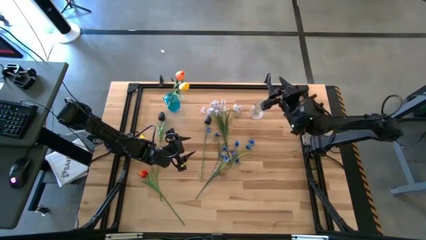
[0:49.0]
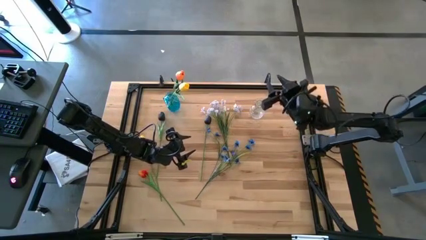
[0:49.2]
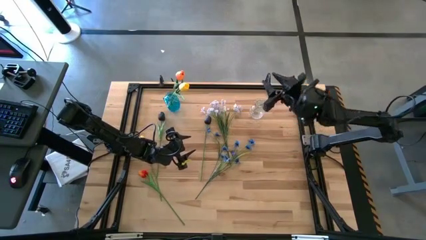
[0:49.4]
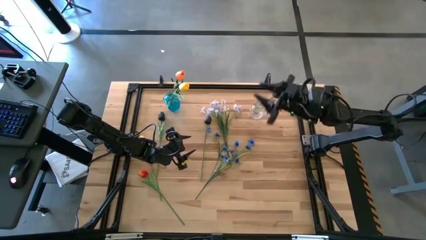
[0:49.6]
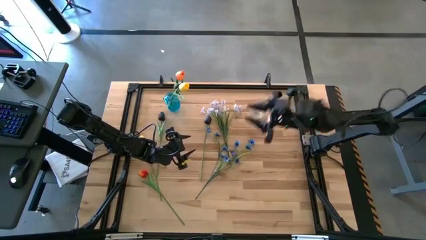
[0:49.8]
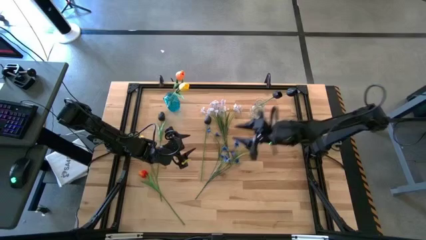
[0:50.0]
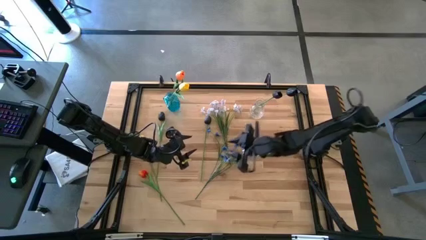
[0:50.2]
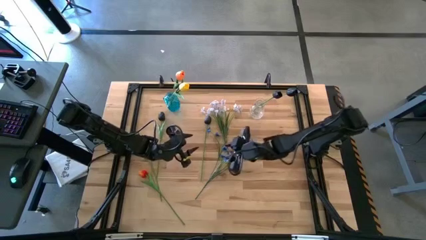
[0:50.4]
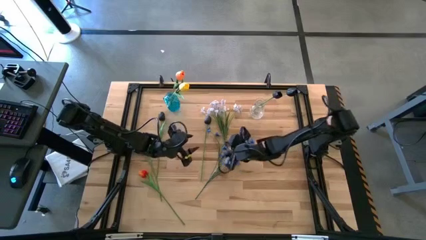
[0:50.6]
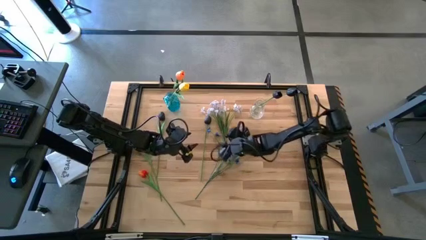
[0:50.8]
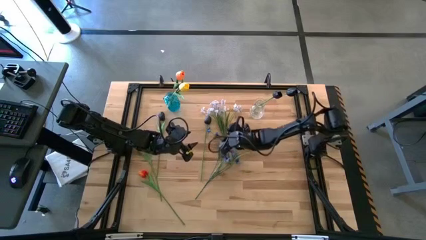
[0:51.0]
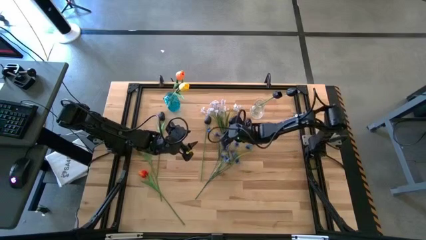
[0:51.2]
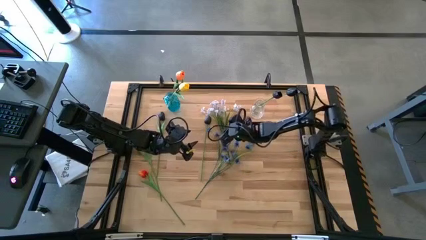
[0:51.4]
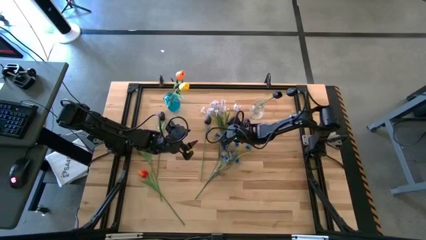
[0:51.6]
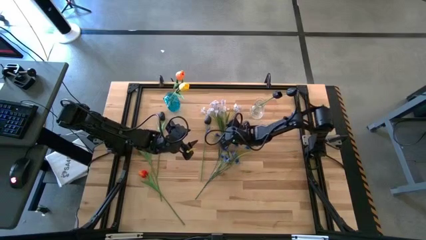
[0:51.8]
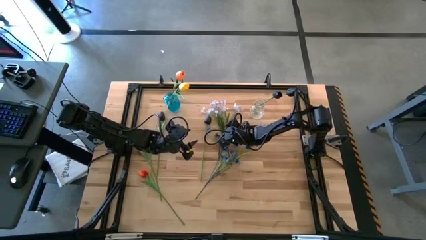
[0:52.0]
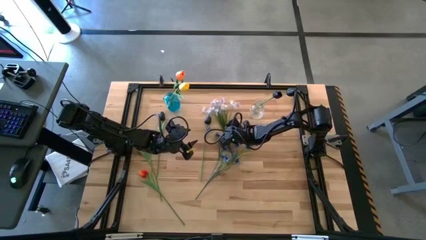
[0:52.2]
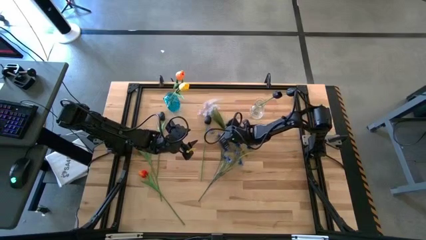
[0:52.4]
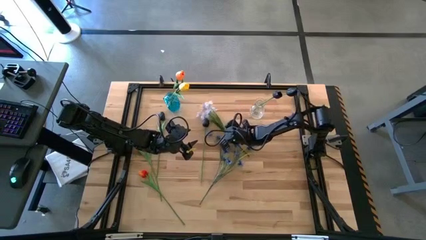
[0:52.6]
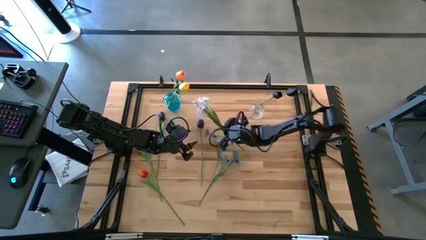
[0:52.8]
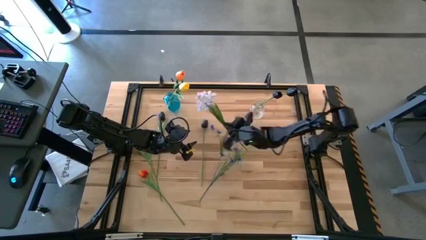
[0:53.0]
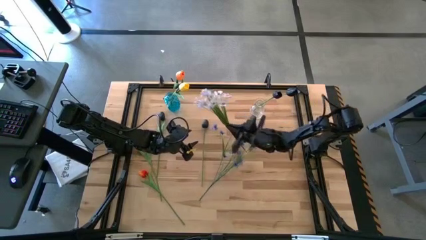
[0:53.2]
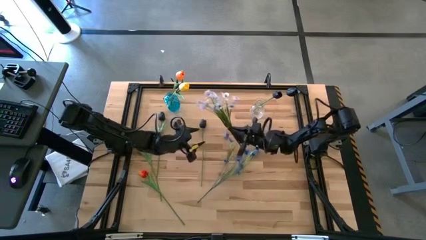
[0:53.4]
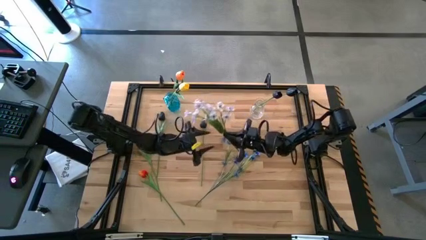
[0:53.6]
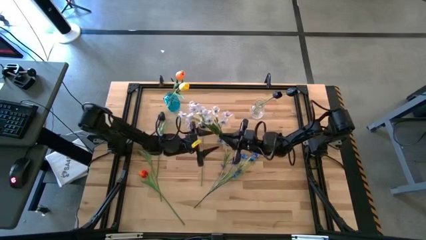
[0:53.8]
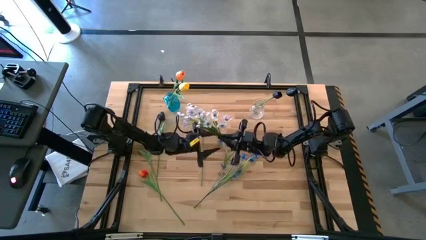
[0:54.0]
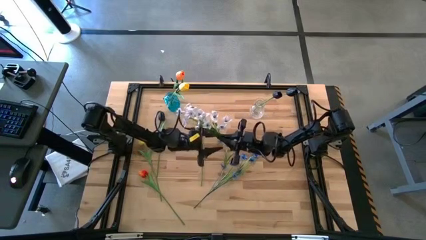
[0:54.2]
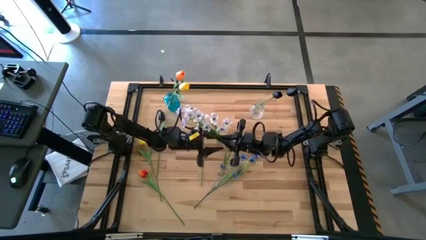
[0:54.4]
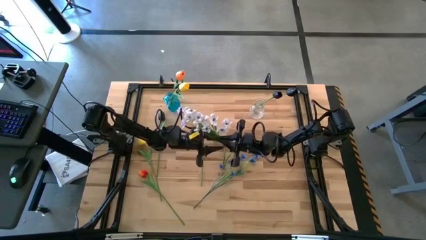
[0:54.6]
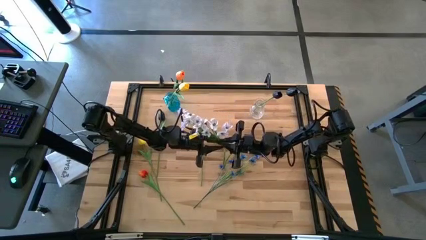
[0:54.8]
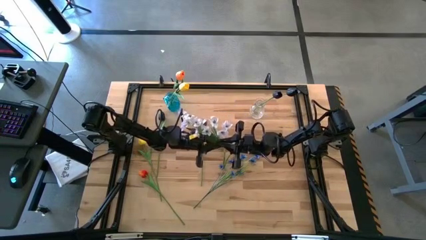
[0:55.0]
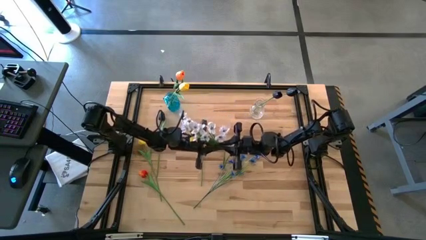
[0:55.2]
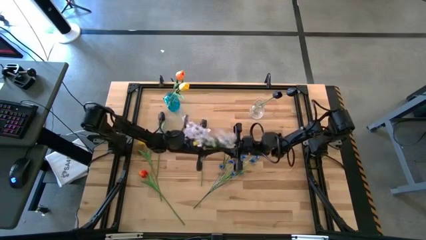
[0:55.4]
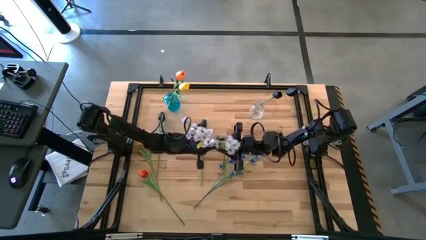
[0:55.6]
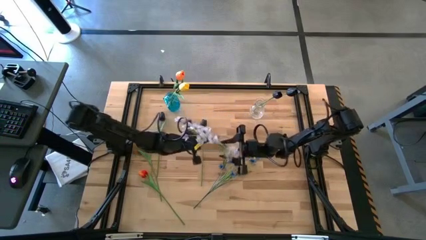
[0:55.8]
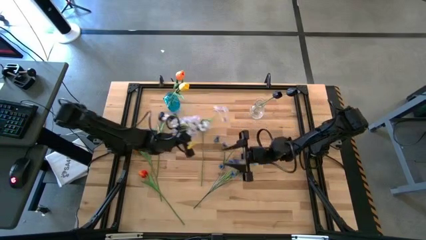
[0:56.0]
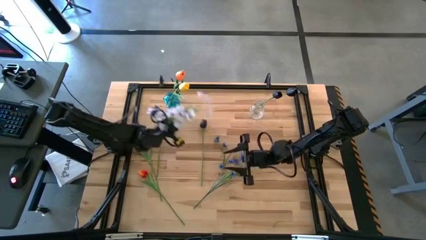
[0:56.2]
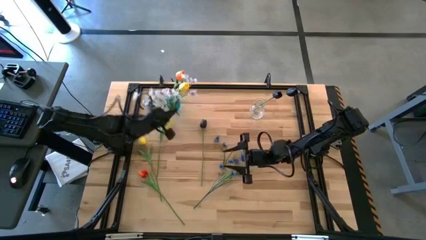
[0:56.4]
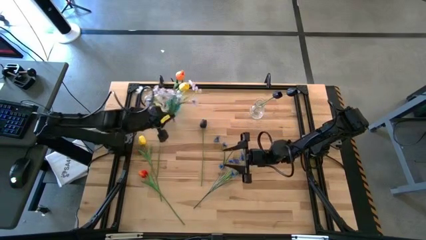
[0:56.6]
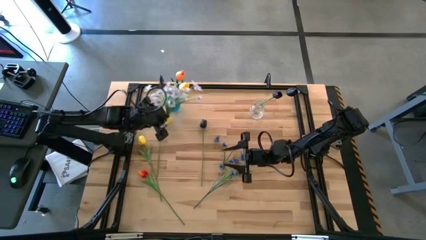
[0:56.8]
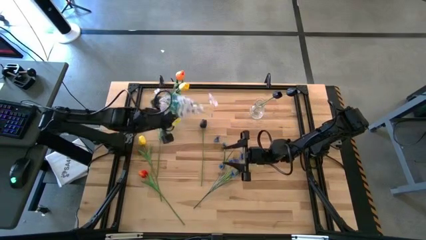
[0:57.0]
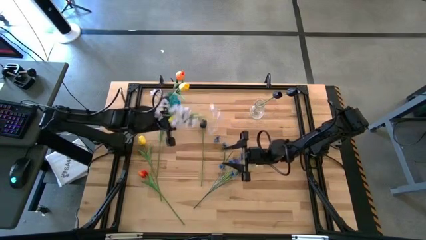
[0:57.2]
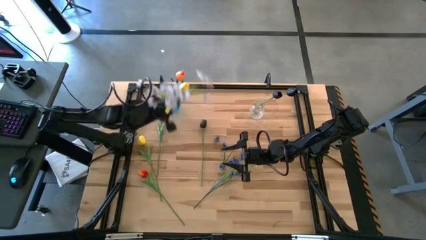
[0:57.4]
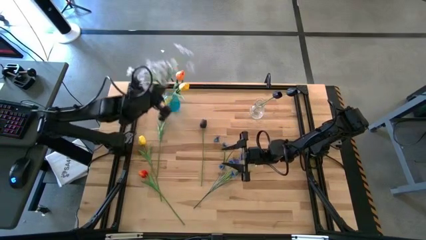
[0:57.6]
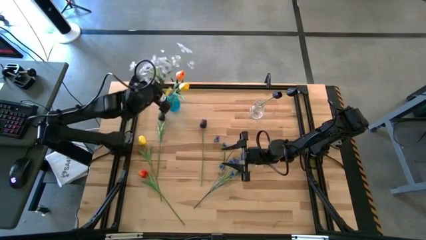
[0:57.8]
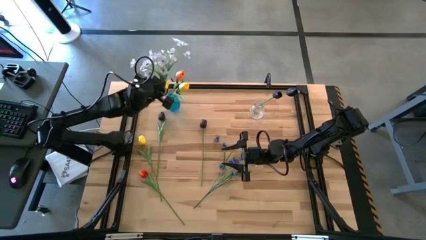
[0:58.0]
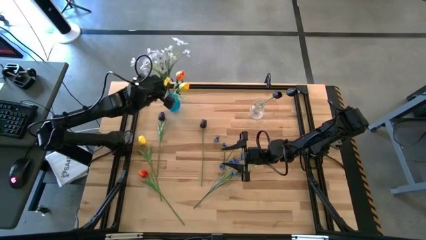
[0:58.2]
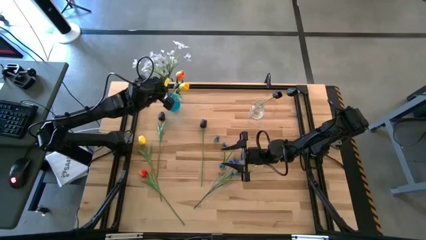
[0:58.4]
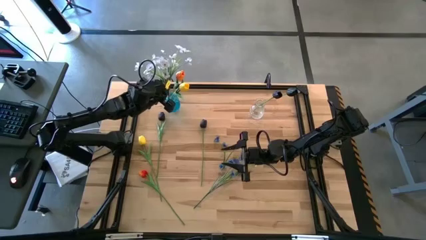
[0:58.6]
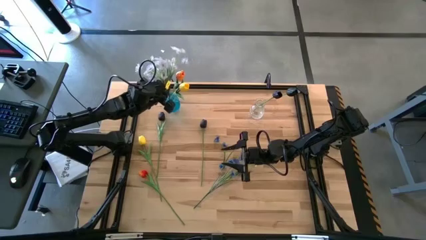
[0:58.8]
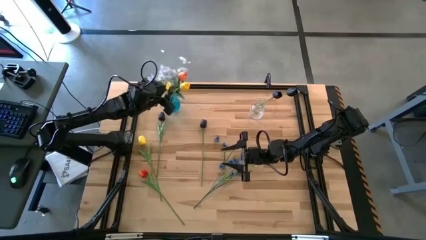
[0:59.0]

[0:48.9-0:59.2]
Task: Sort flowers into vase by color
Put the white flowers into the blue vase

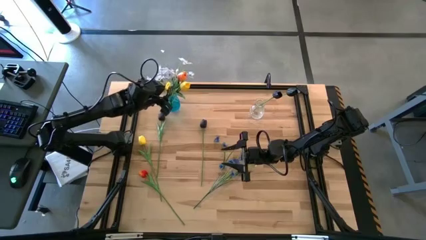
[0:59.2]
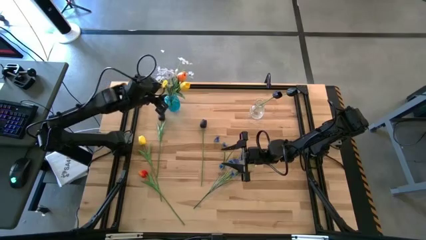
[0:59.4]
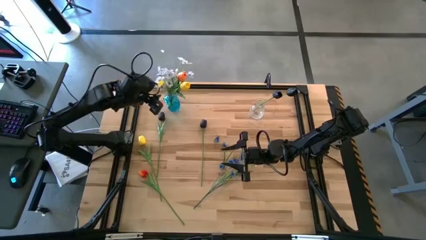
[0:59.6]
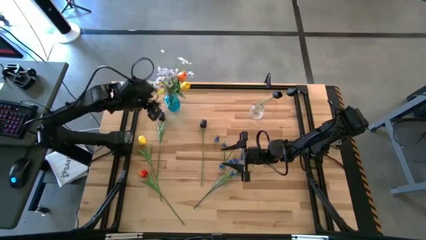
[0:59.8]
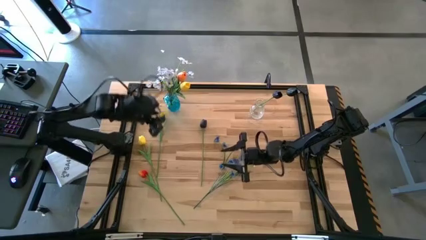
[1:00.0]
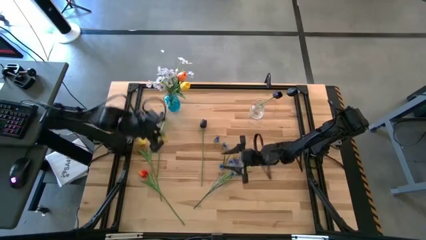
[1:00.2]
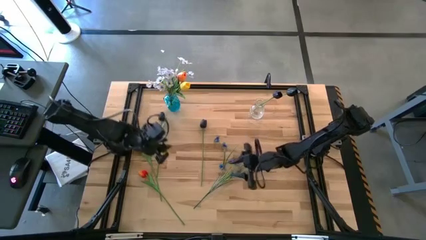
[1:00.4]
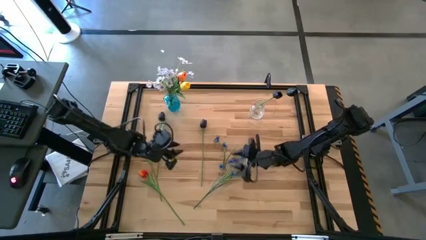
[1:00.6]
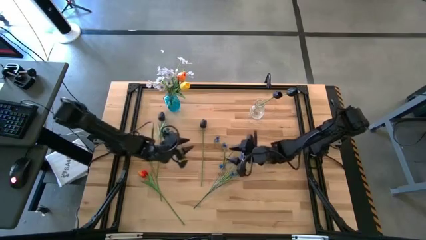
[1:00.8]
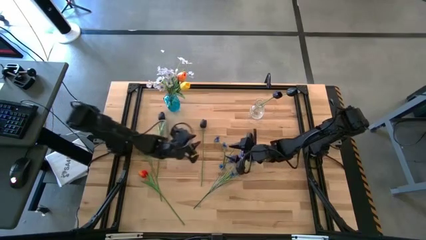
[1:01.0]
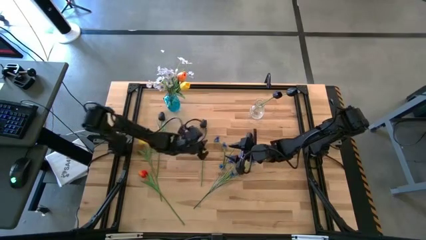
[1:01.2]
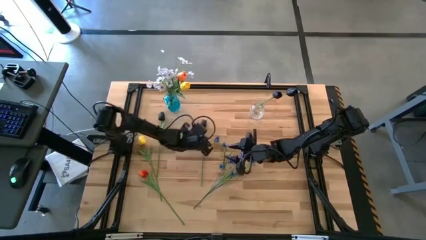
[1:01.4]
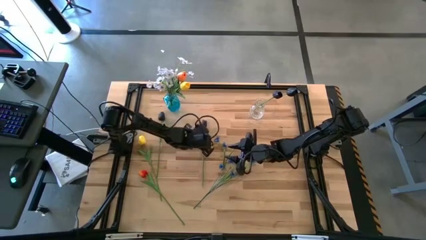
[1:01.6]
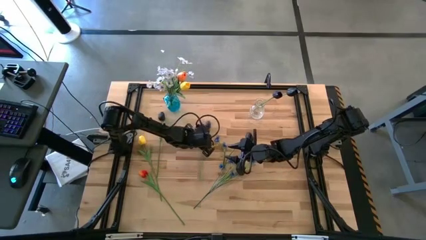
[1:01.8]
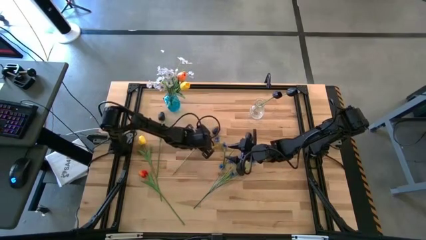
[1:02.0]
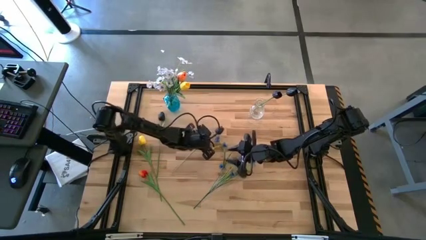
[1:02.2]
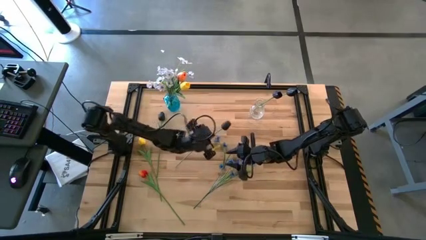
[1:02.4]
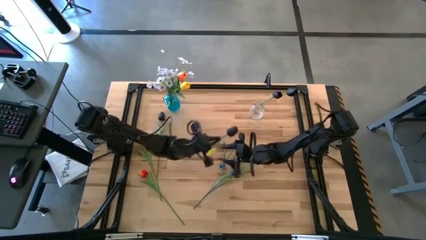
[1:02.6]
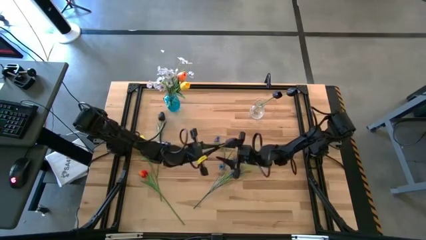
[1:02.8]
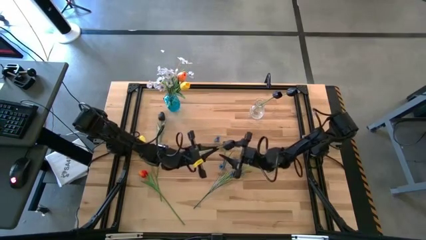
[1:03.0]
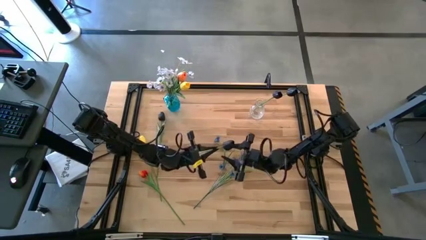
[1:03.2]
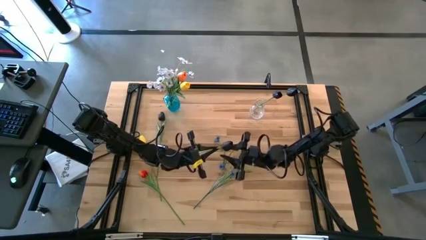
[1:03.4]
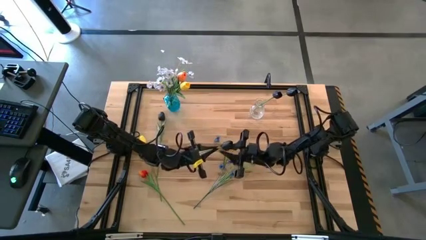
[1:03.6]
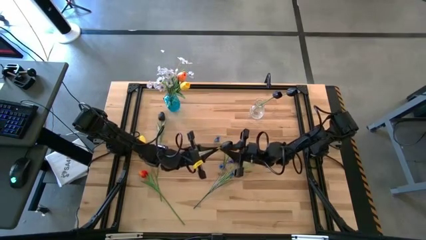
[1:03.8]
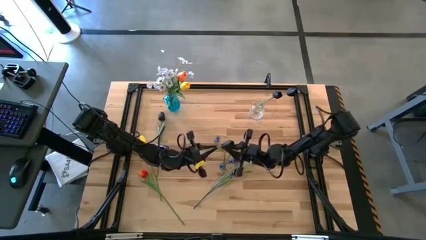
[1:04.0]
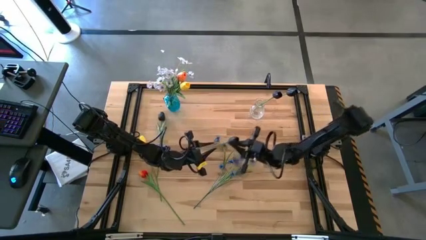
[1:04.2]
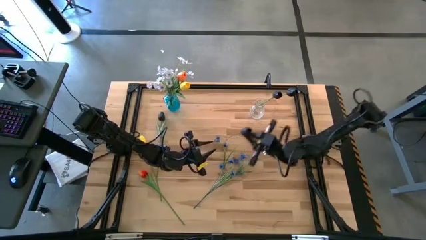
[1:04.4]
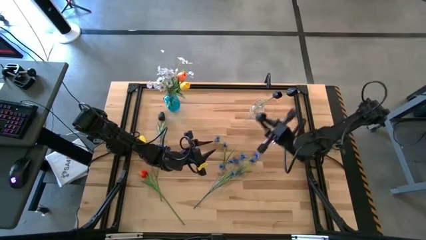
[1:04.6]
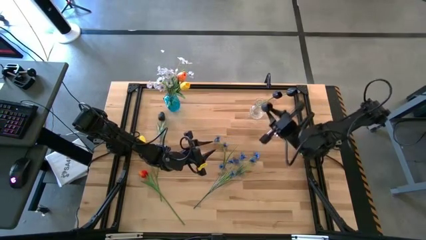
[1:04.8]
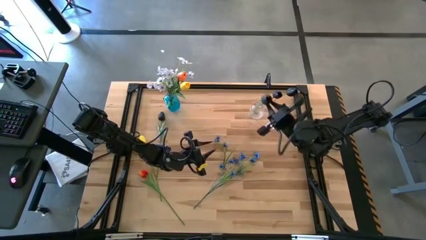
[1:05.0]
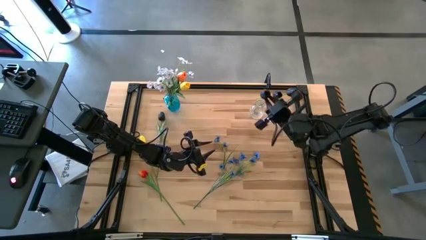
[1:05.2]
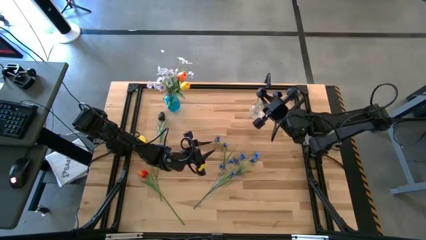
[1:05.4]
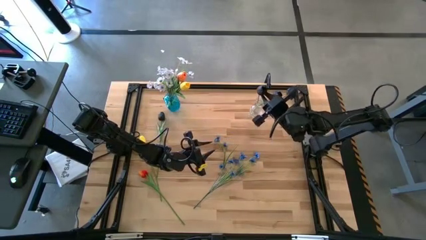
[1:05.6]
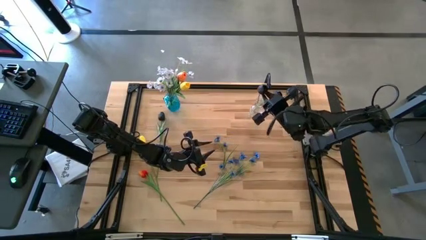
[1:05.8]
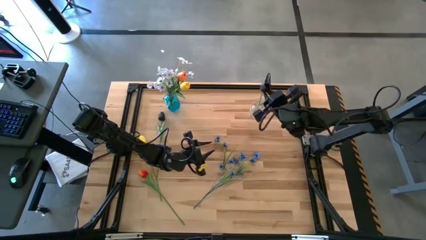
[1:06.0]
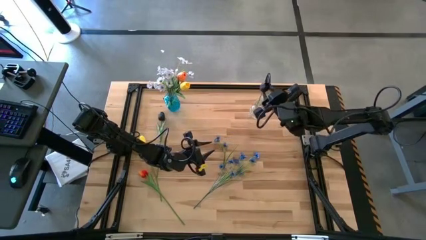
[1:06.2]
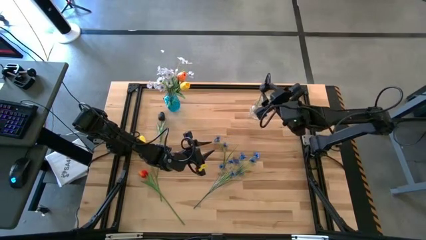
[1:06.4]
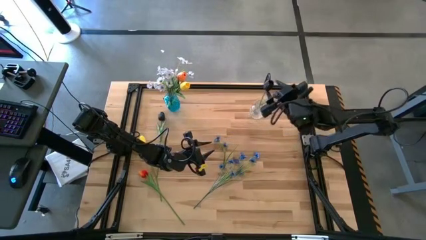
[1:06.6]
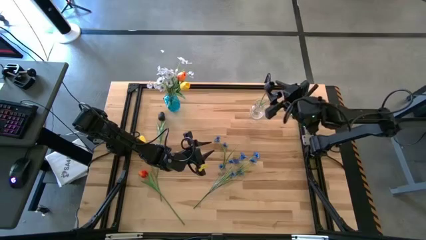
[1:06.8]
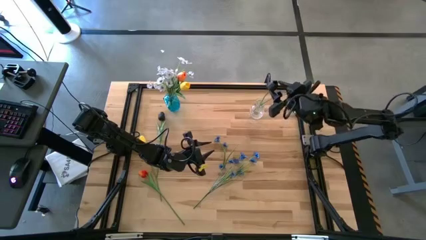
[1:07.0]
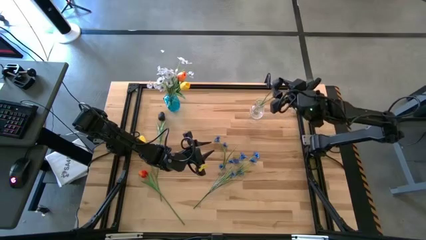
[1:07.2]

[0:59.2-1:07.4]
Put the black flower into the transparent vase
